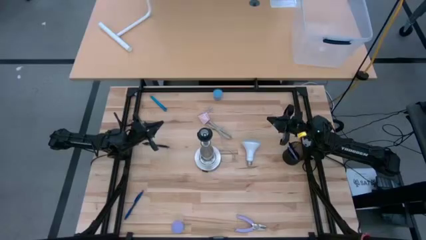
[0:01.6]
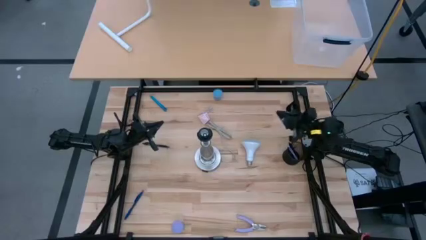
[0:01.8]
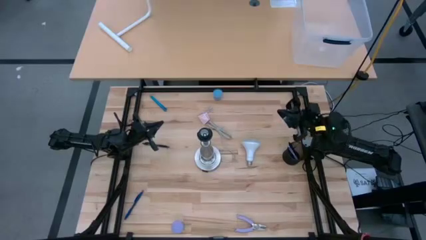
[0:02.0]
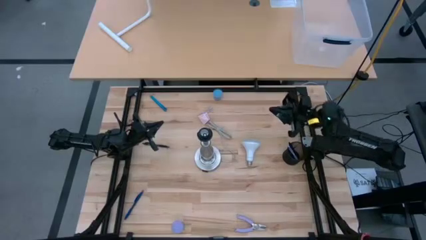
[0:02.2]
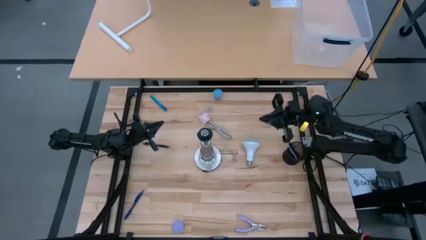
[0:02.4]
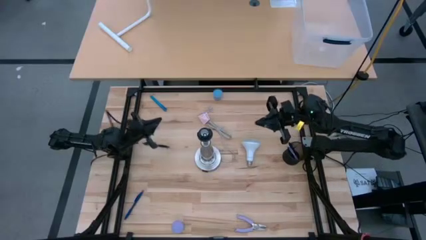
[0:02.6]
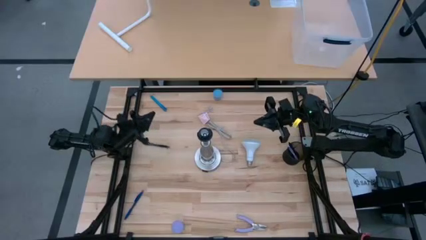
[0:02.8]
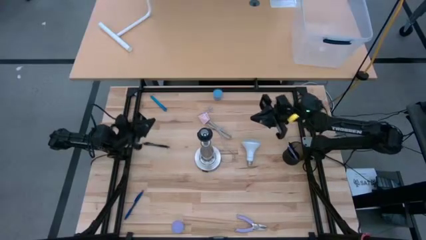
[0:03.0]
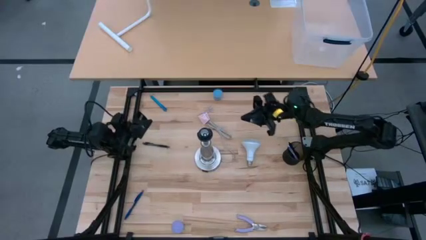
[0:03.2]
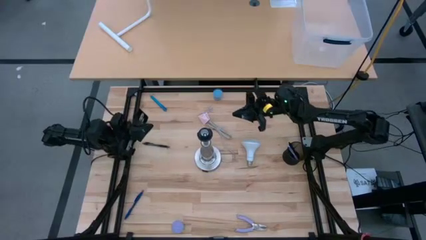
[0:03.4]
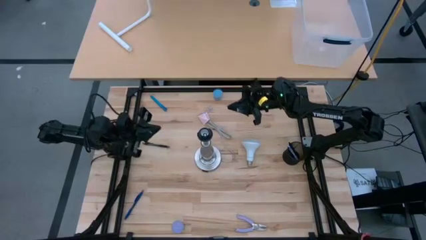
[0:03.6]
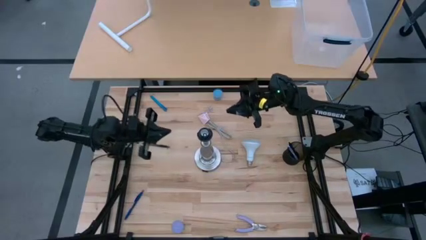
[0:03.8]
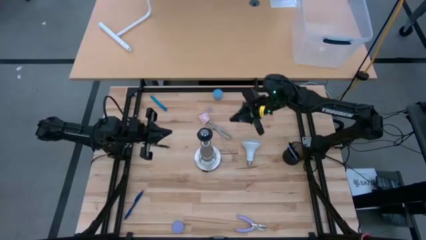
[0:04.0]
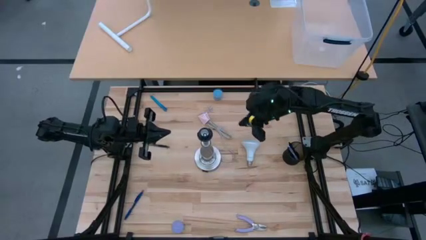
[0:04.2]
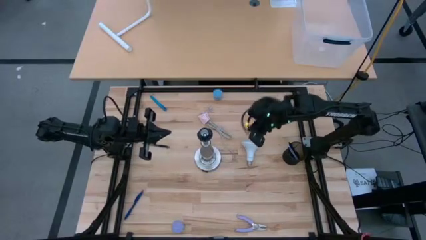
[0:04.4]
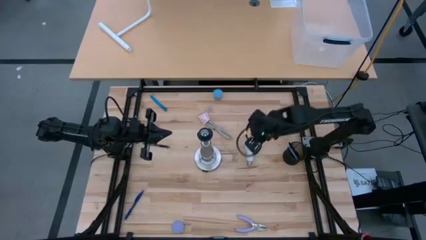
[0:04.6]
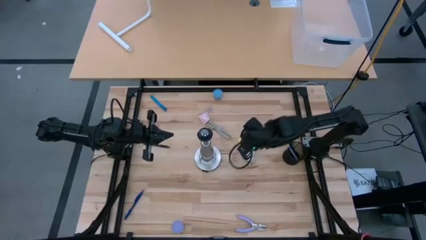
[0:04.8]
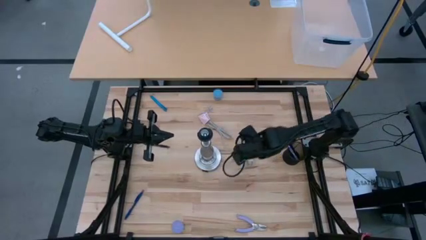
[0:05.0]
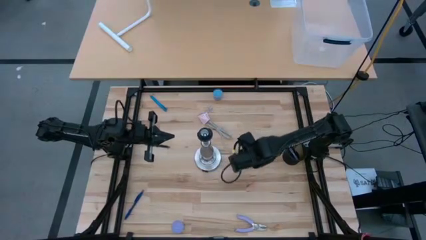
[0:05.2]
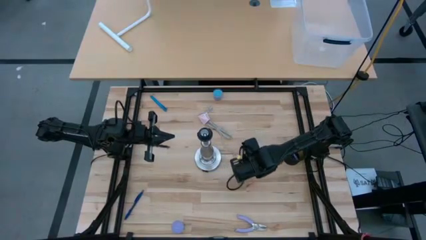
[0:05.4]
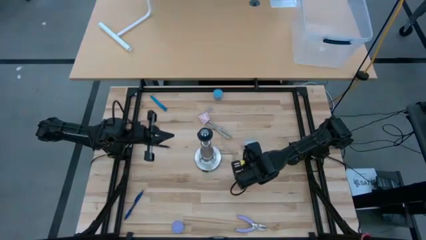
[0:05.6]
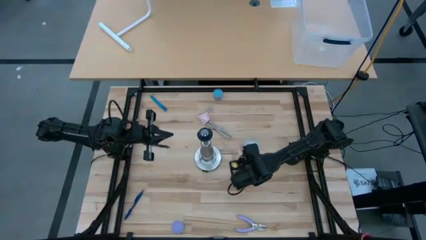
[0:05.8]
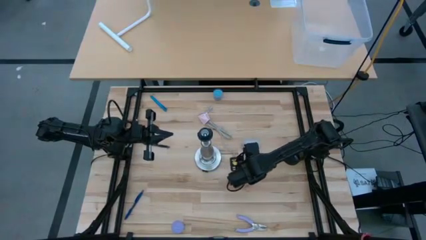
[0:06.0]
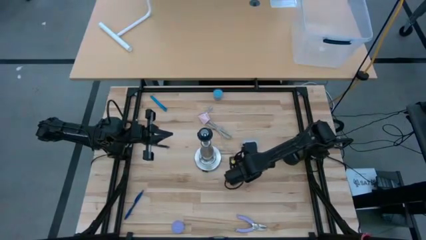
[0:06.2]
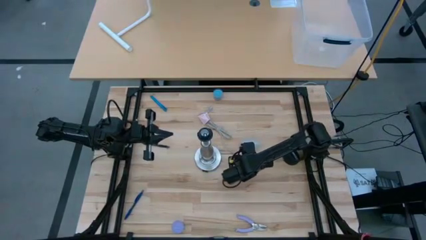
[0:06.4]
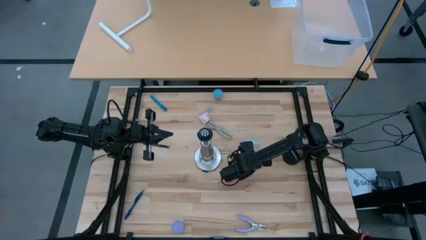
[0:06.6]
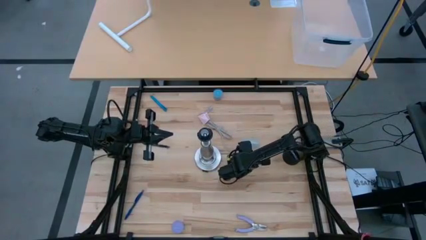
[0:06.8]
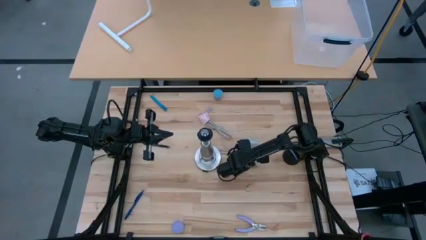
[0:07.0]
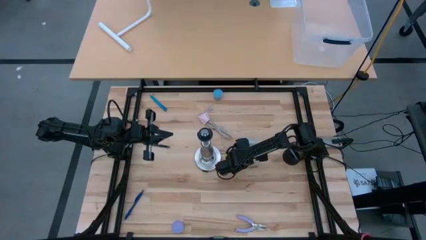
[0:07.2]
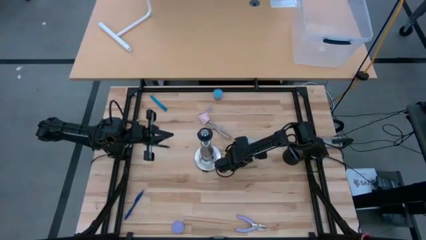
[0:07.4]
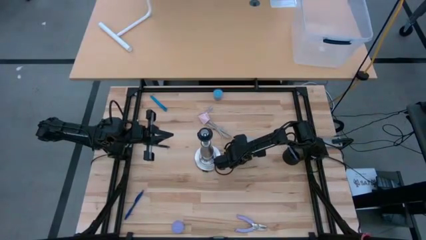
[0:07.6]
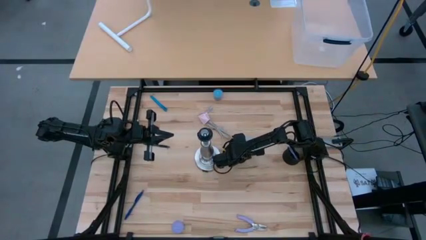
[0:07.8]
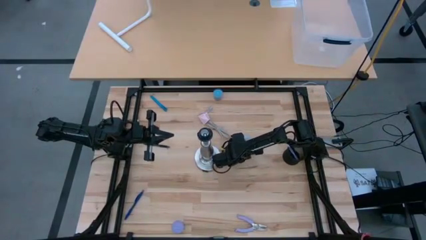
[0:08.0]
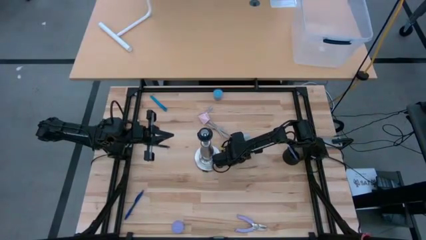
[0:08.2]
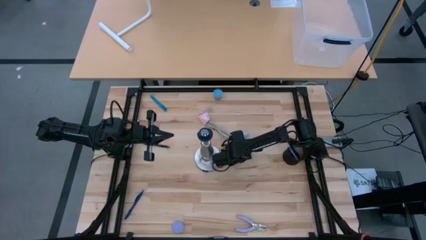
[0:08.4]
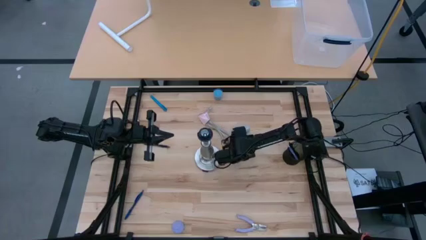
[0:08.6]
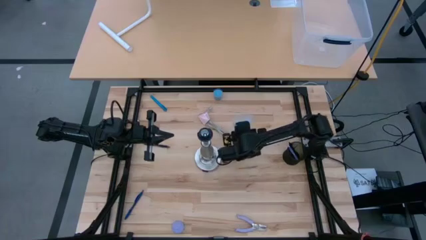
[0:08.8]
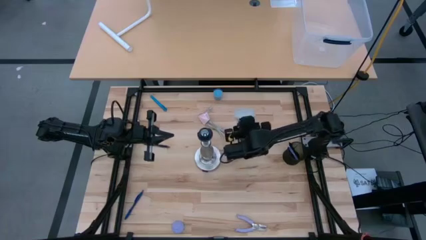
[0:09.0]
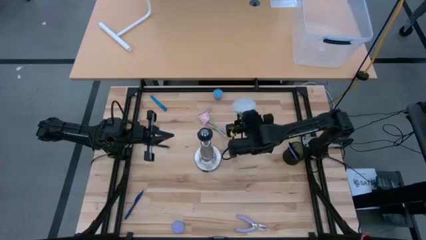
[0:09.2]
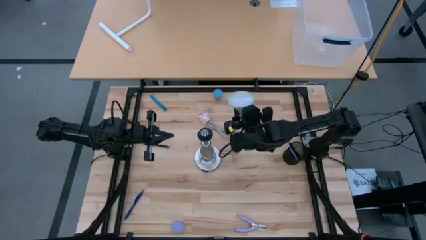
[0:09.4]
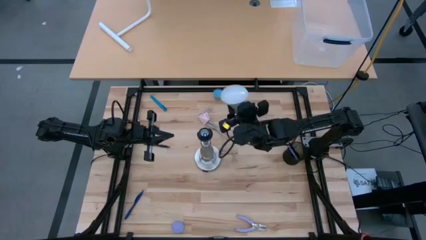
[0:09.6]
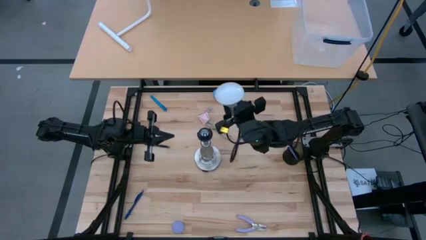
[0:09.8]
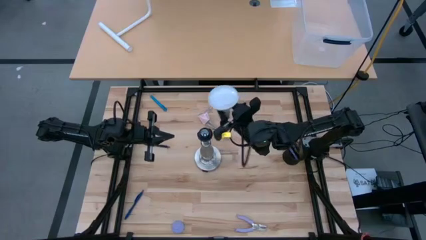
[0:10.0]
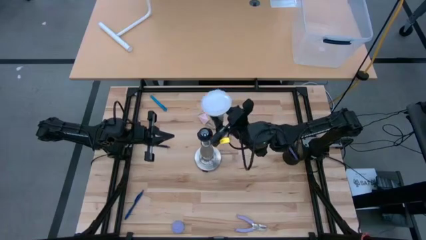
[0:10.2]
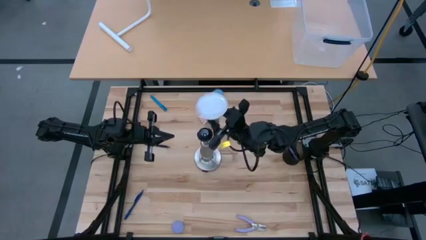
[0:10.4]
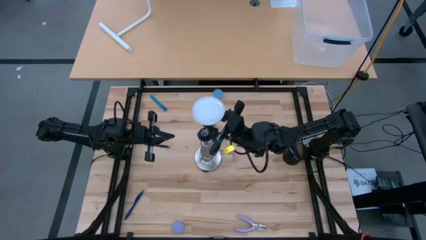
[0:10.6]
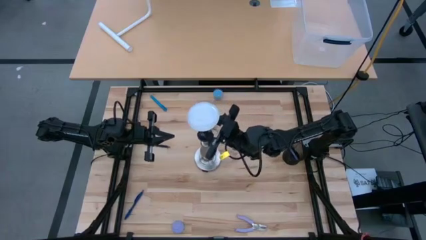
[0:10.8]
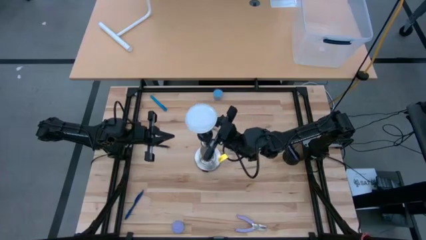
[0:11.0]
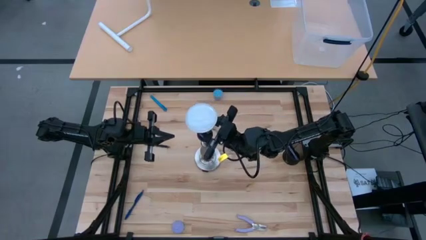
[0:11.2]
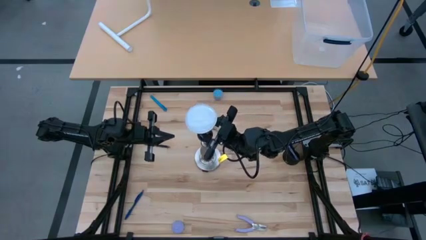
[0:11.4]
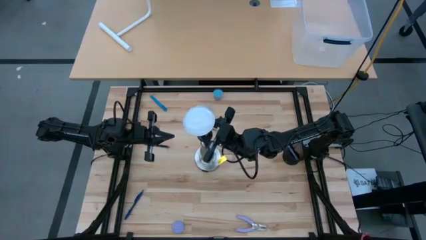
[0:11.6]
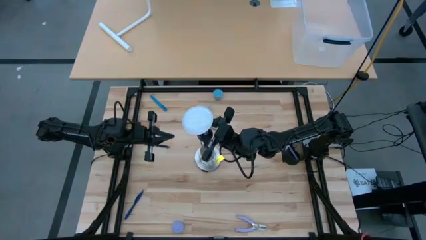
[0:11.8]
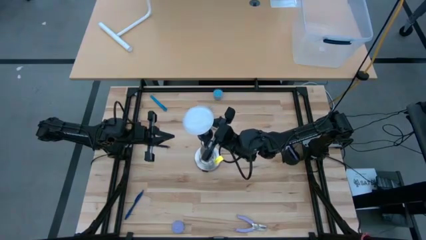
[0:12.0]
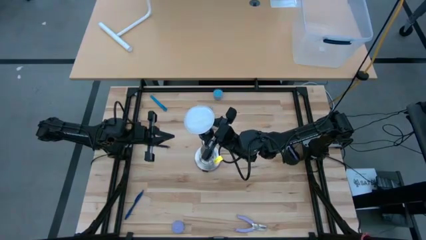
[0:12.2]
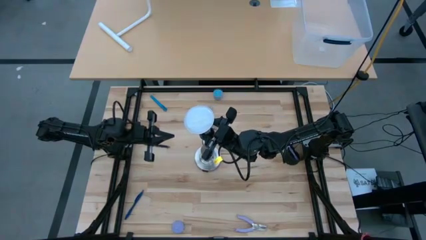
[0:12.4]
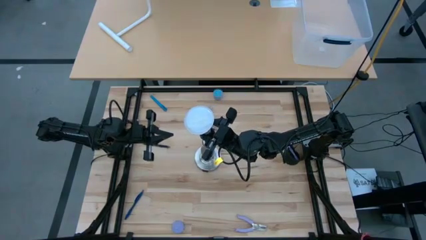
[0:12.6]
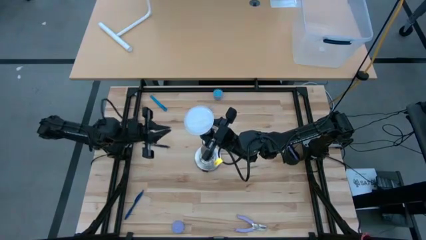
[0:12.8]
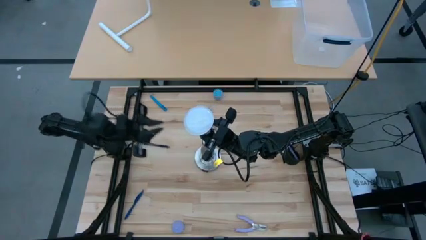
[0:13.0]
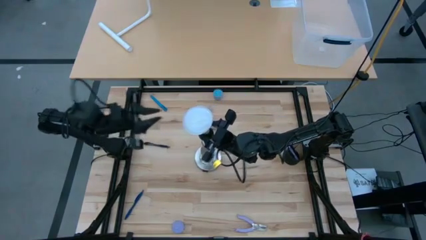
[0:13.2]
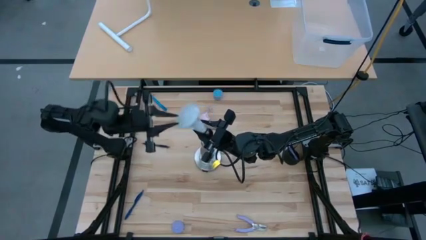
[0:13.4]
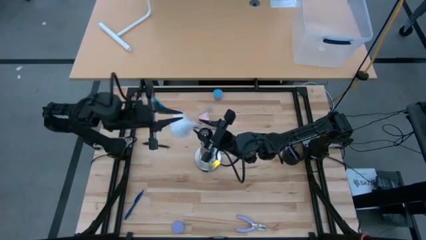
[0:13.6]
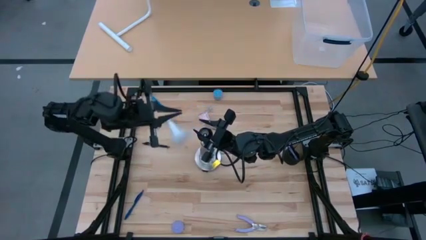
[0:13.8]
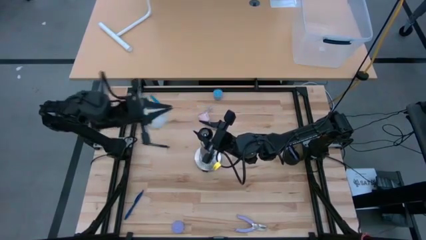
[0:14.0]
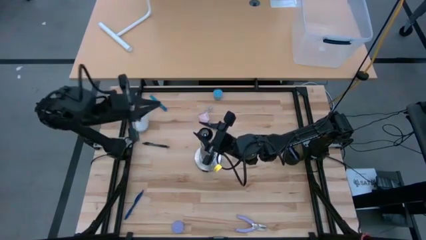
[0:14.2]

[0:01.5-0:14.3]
Task: Screw lightbulb
Insert the lightbulb into the lamp
